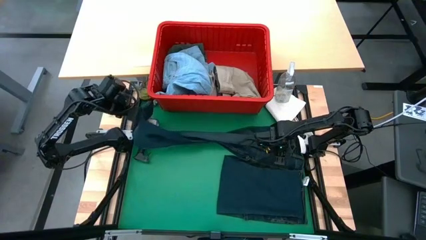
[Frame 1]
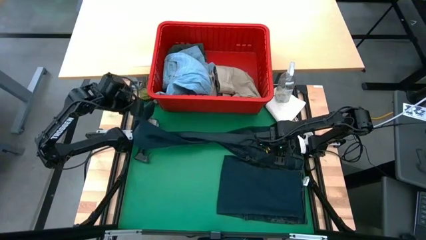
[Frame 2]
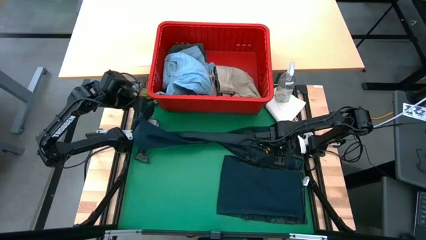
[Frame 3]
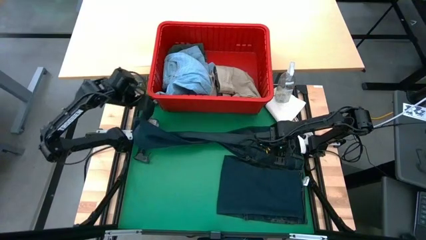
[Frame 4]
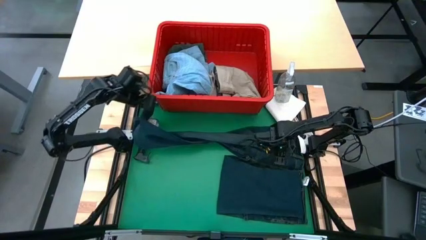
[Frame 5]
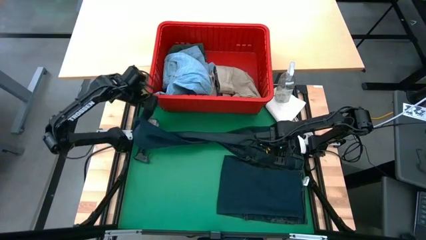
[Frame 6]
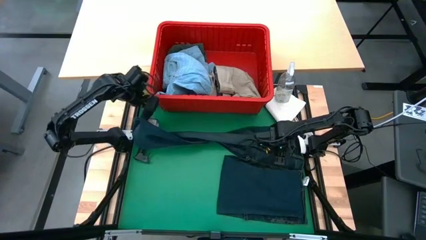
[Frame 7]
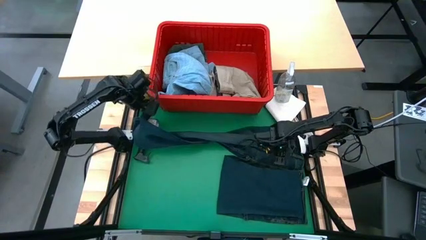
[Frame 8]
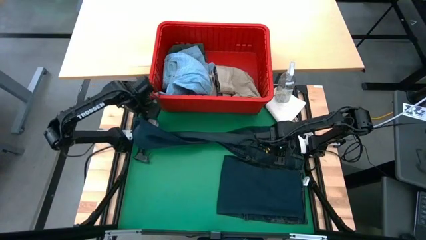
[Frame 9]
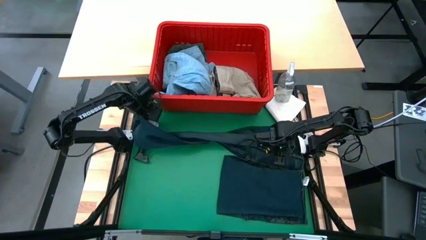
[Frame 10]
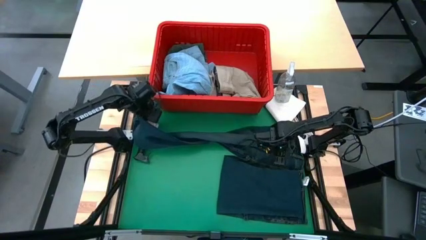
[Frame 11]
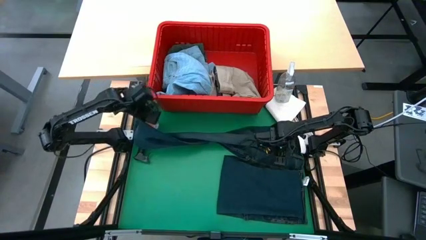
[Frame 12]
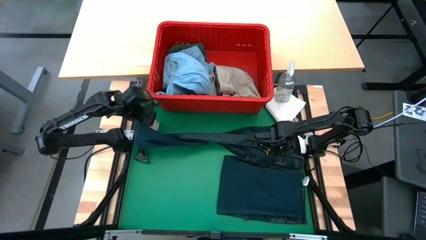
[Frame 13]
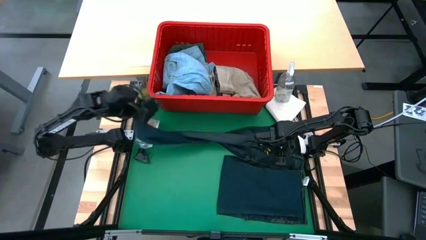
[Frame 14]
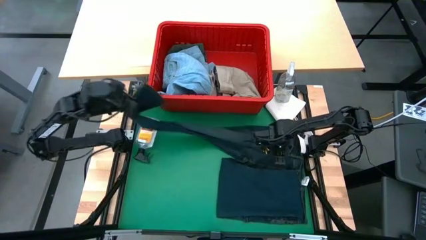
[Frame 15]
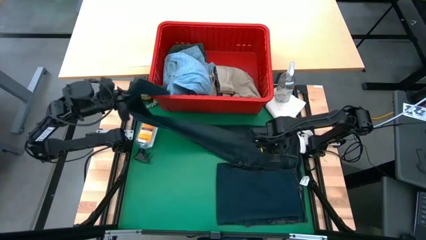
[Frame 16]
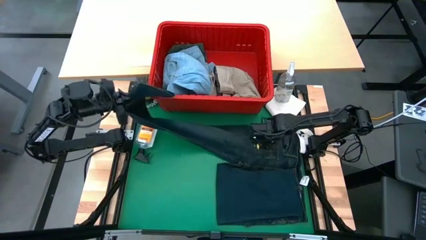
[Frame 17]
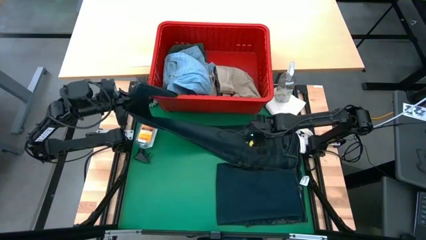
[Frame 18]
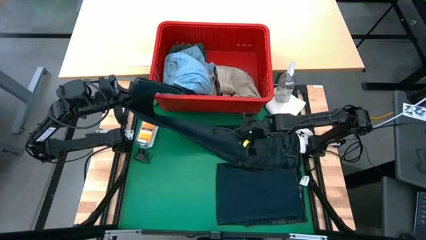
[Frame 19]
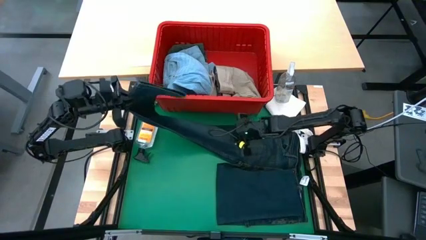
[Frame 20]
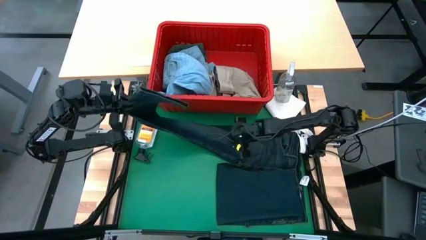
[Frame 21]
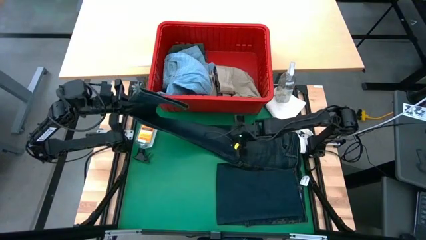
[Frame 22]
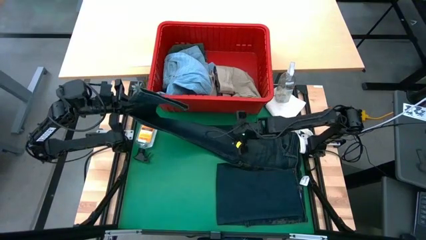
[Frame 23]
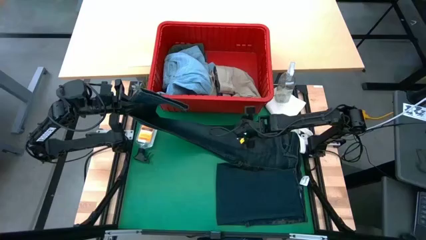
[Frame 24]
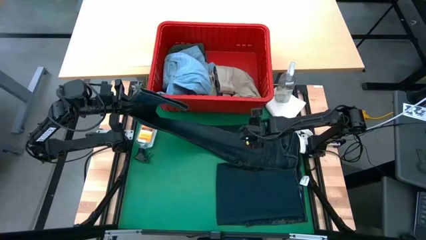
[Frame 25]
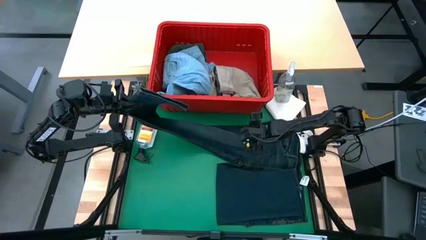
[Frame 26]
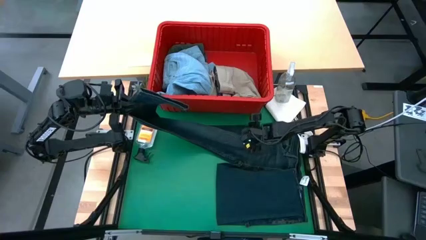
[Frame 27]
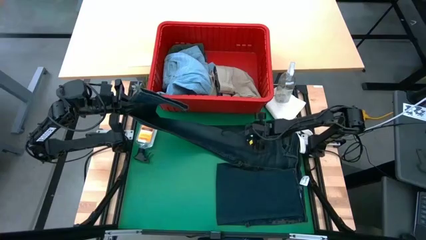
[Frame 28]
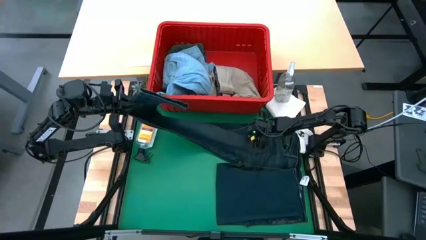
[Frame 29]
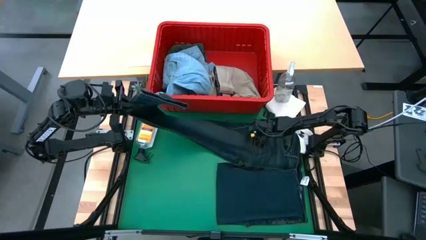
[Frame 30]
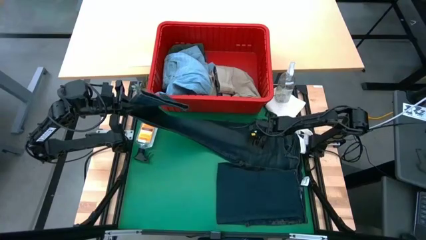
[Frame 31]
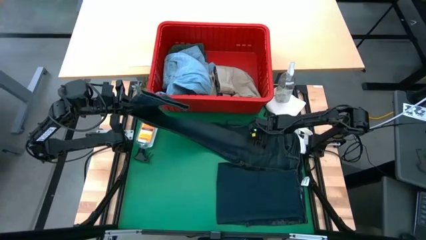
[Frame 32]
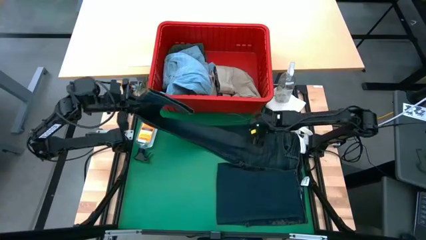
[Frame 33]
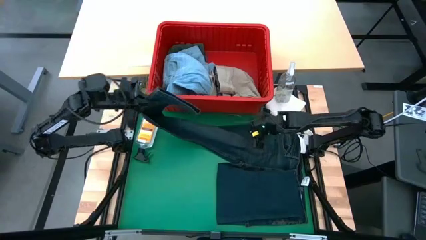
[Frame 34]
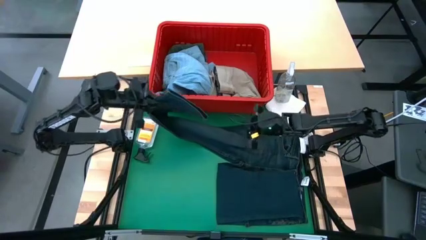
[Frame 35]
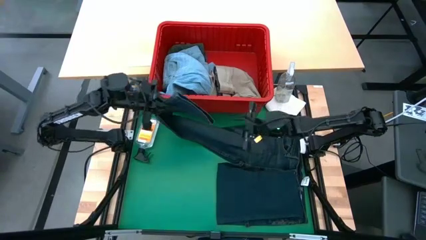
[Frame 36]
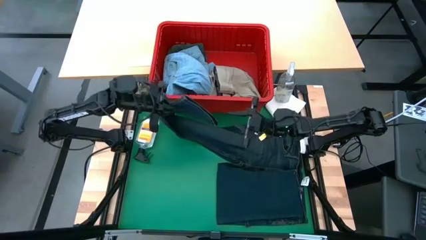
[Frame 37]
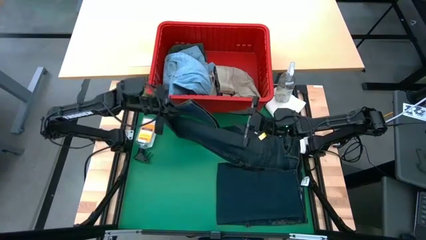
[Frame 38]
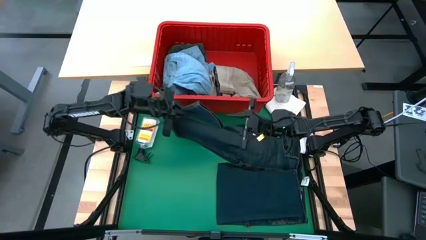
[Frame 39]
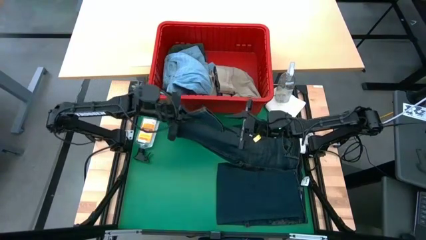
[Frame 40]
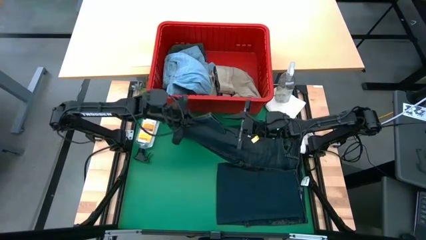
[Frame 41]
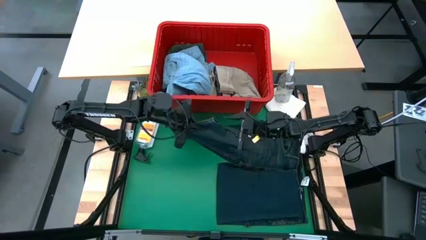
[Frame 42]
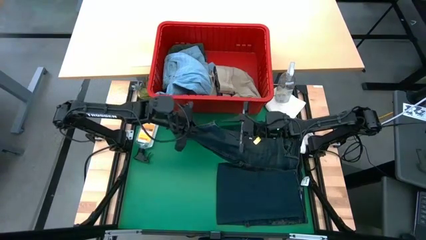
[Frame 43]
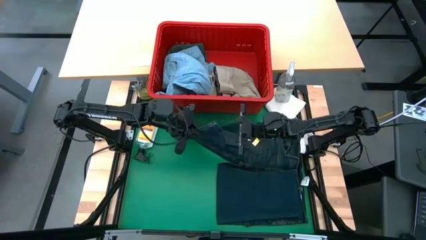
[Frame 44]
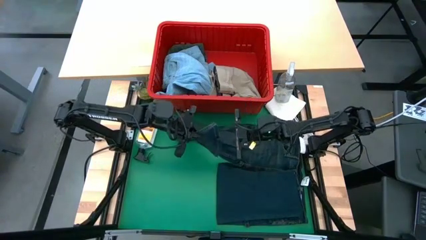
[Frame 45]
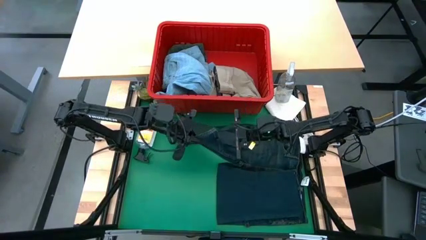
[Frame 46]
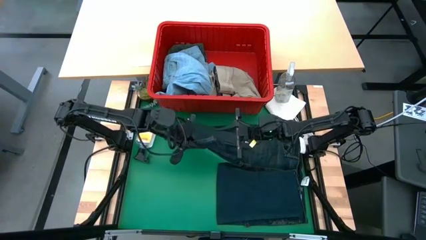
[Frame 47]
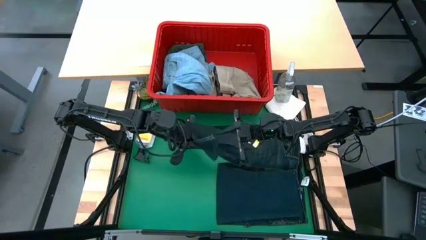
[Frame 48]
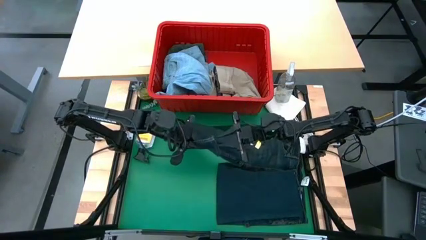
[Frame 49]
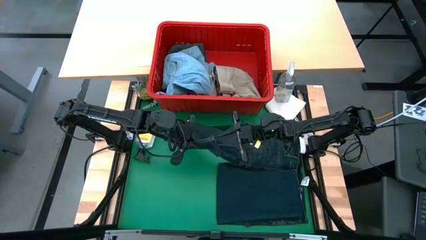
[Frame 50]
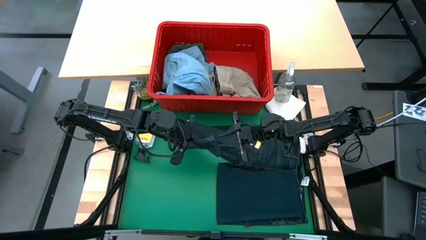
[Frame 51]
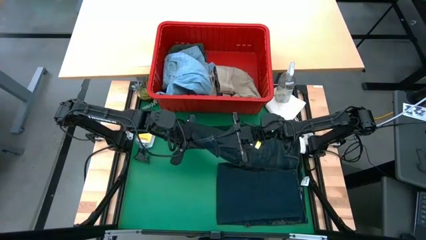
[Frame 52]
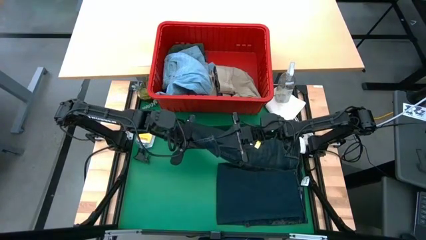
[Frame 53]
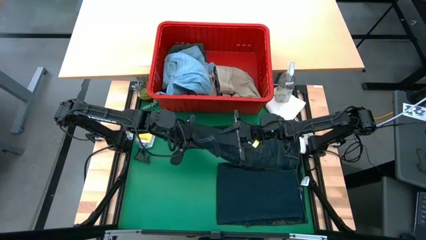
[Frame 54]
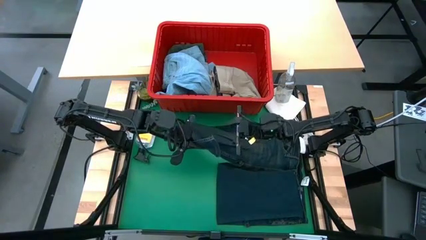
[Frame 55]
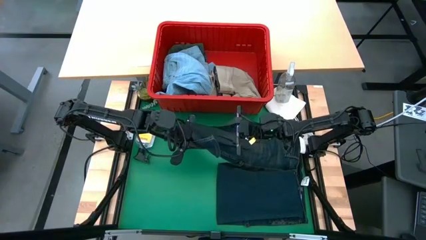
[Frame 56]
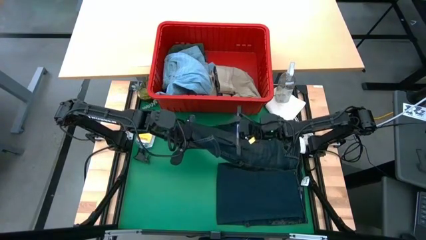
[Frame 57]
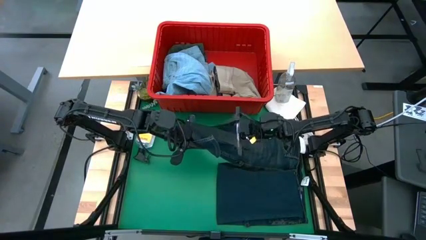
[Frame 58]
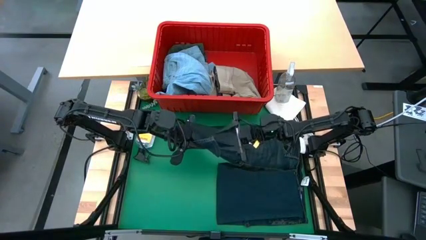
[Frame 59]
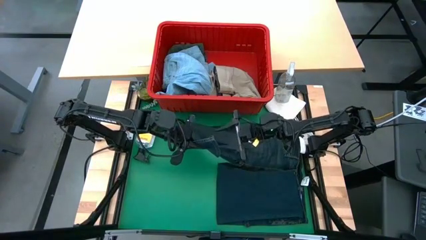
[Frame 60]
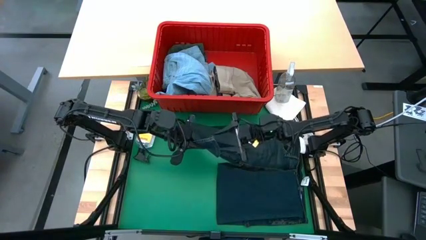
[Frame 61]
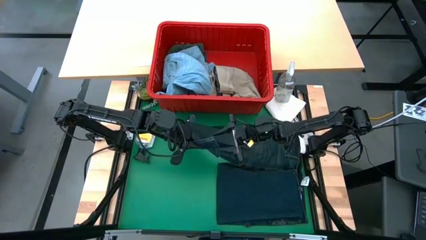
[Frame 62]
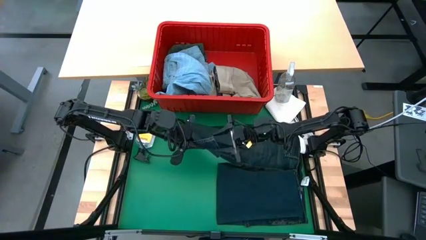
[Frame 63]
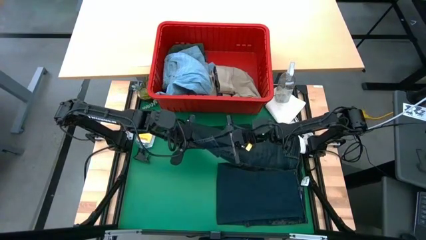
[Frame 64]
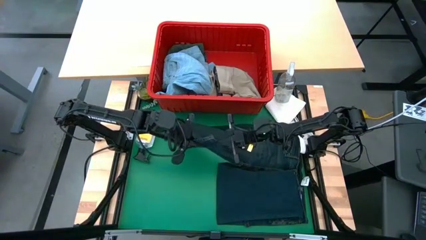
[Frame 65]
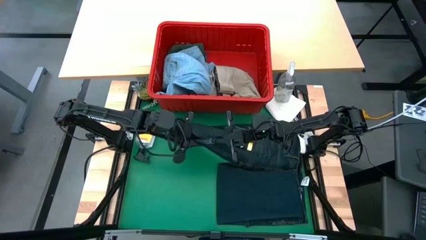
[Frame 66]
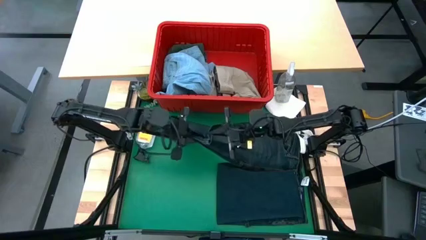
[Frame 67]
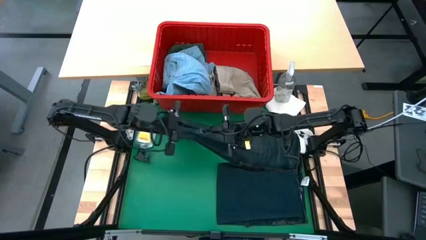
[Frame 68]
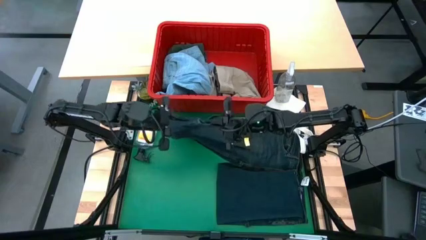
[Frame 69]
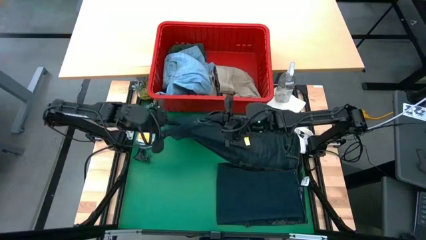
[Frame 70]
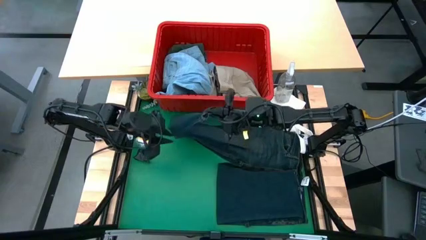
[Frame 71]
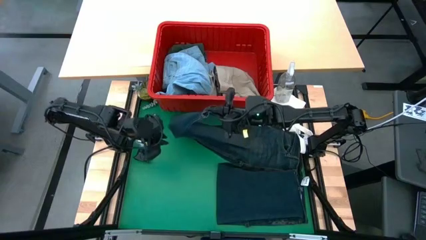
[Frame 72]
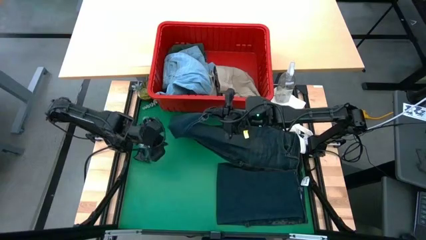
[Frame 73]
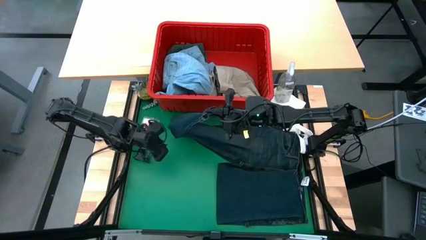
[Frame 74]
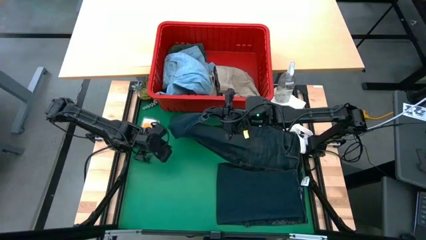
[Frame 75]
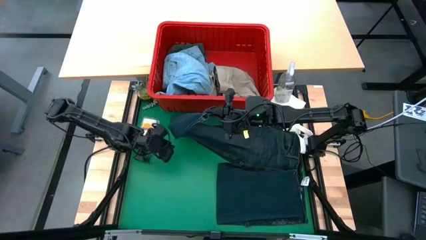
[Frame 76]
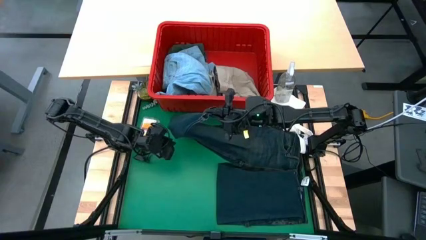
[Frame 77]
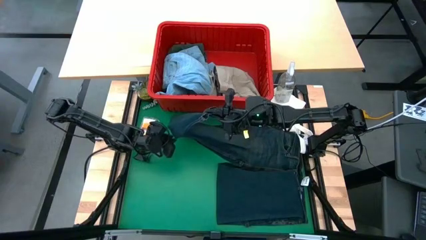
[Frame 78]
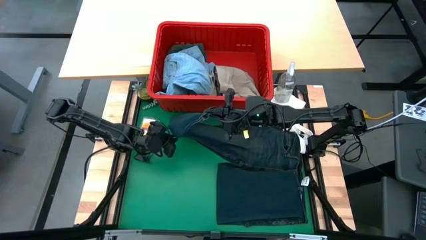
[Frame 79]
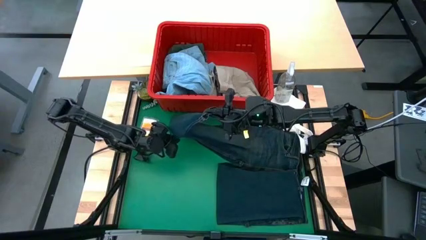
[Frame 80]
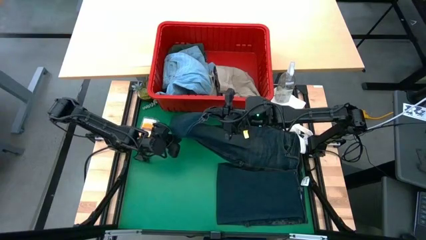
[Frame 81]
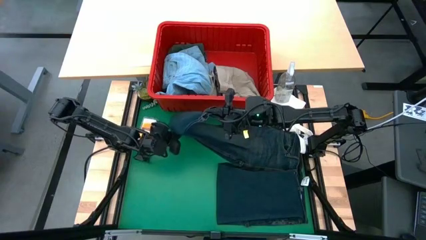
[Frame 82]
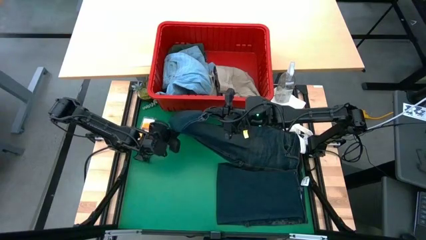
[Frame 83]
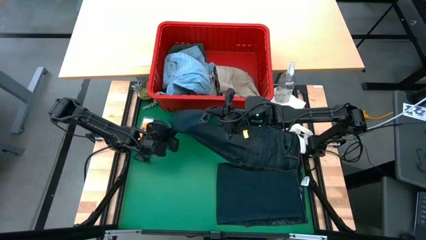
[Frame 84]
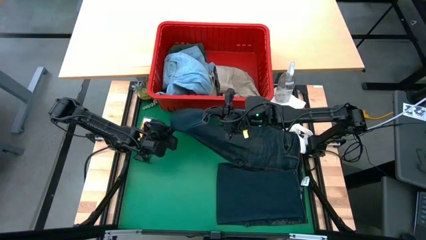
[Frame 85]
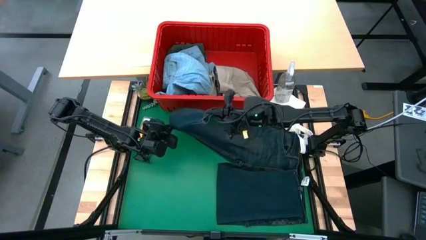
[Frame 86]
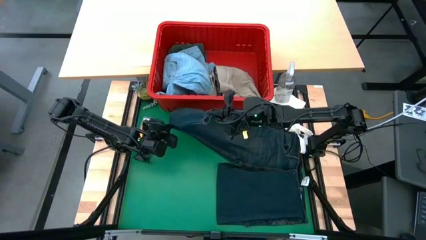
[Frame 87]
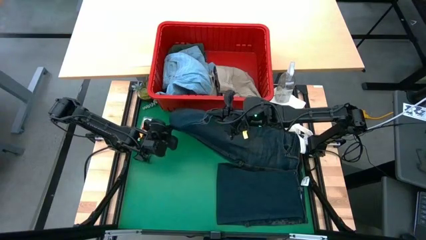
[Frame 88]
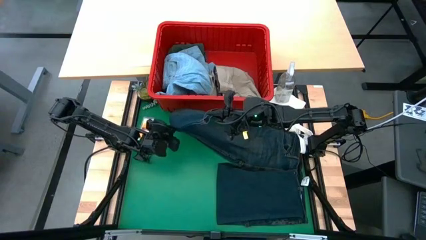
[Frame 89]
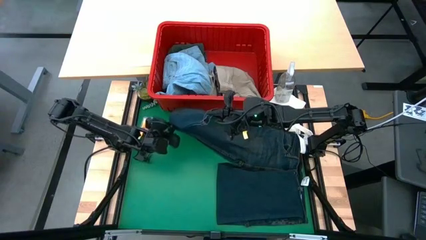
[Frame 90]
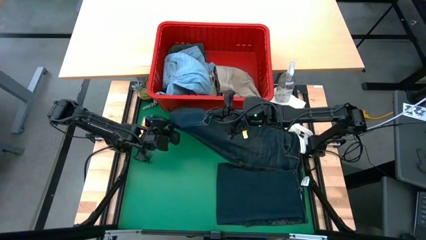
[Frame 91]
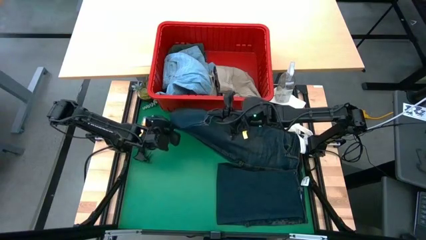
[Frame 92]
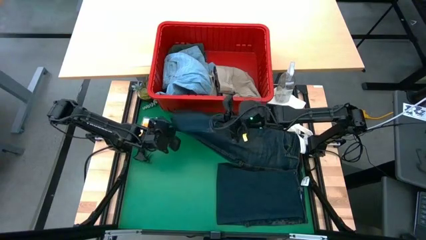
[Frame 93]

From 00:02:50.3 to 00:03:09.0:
Task: Fold laundry
Fold the dark blue jeans
